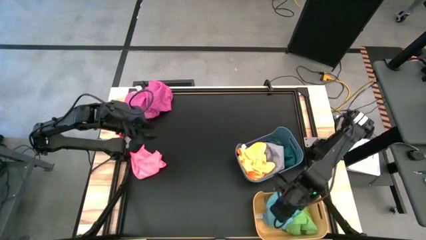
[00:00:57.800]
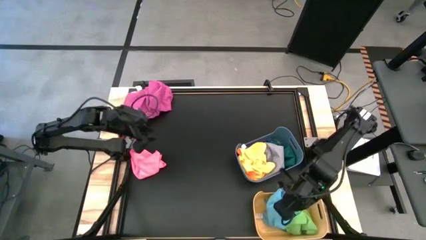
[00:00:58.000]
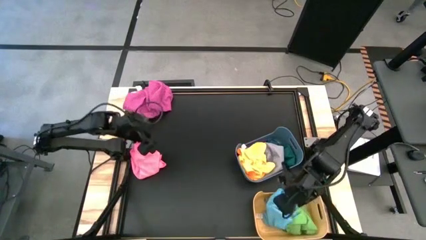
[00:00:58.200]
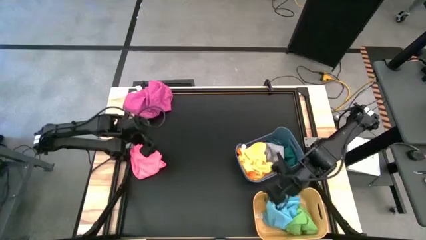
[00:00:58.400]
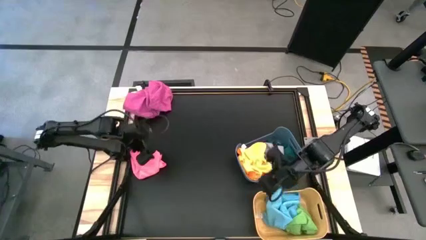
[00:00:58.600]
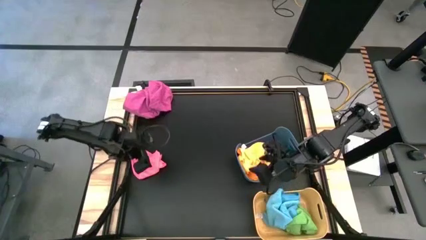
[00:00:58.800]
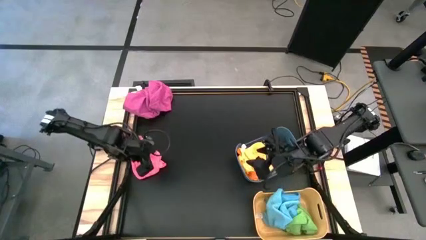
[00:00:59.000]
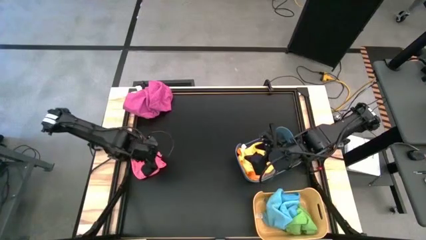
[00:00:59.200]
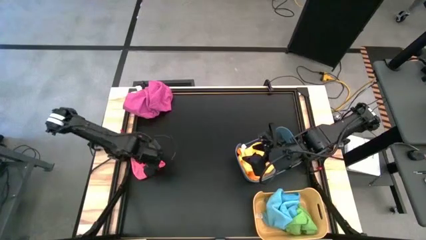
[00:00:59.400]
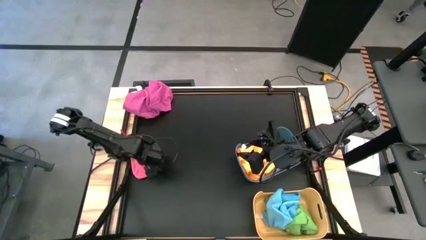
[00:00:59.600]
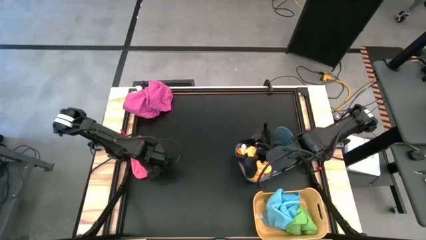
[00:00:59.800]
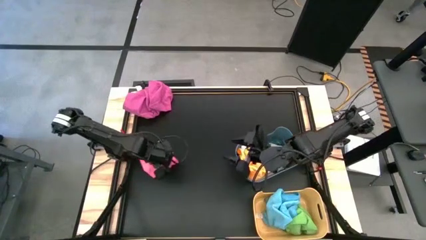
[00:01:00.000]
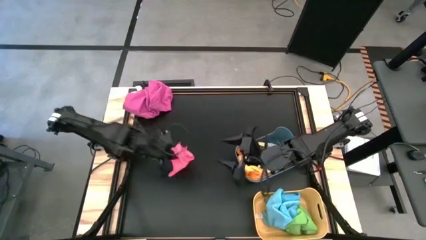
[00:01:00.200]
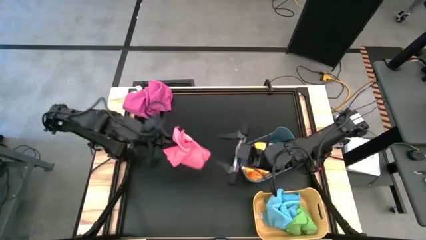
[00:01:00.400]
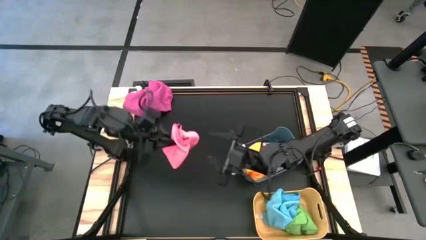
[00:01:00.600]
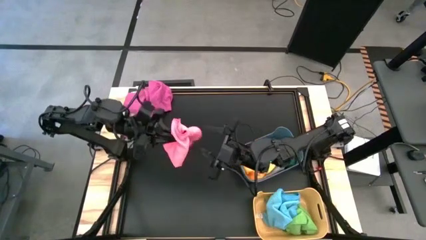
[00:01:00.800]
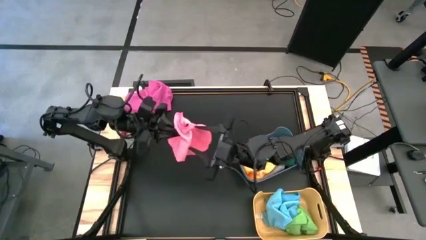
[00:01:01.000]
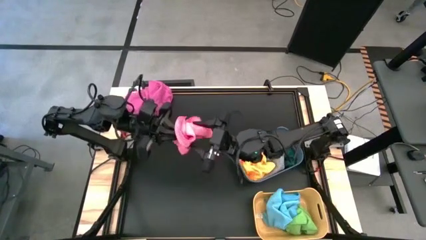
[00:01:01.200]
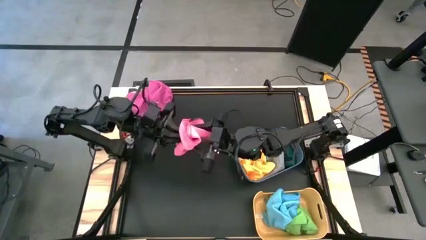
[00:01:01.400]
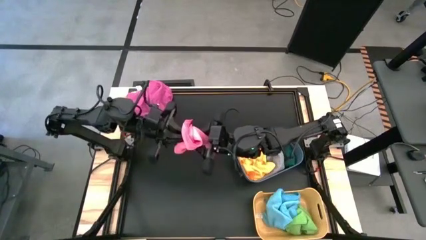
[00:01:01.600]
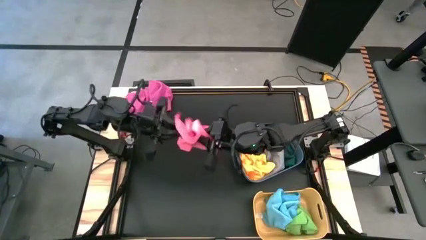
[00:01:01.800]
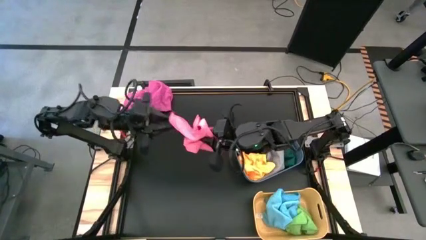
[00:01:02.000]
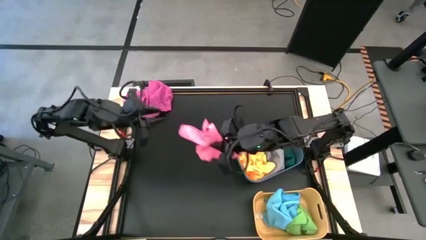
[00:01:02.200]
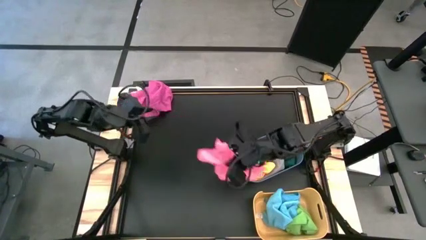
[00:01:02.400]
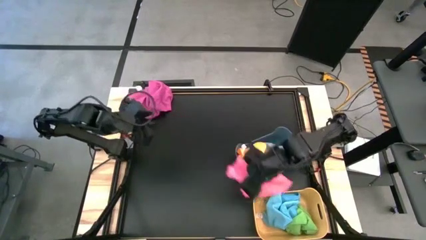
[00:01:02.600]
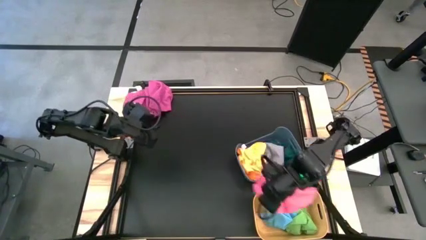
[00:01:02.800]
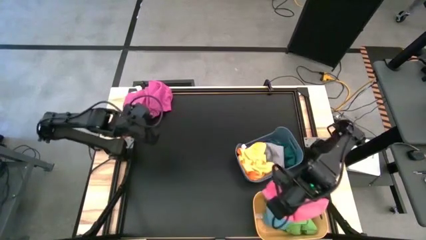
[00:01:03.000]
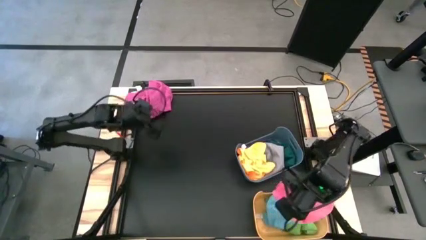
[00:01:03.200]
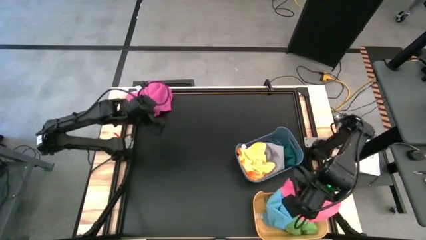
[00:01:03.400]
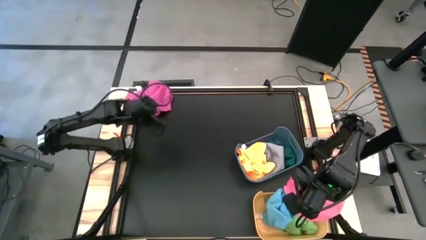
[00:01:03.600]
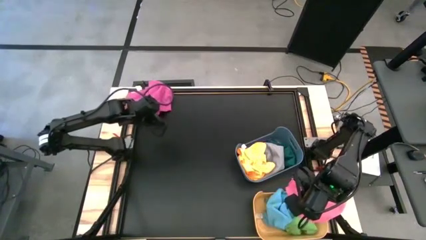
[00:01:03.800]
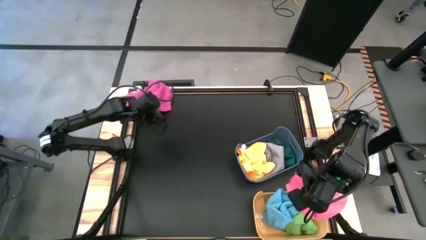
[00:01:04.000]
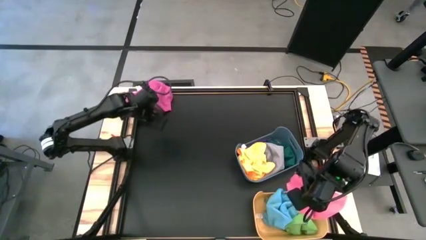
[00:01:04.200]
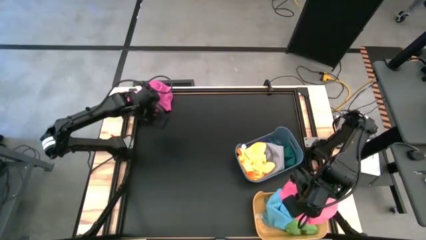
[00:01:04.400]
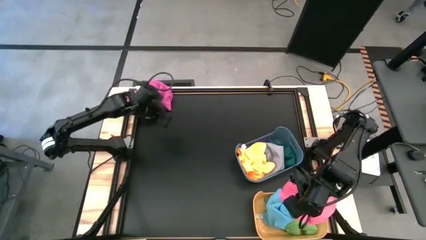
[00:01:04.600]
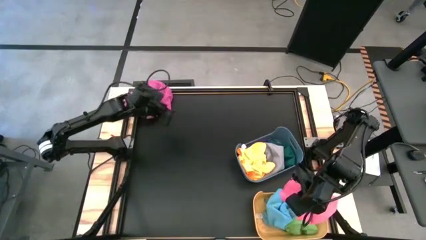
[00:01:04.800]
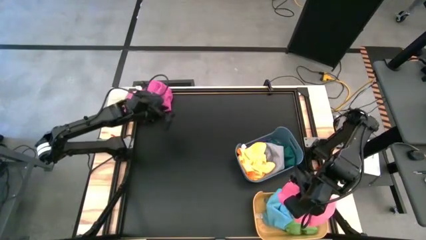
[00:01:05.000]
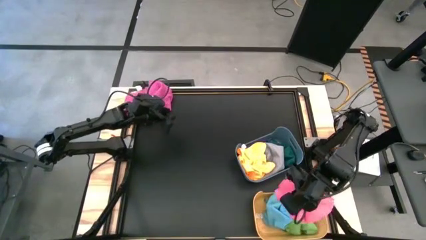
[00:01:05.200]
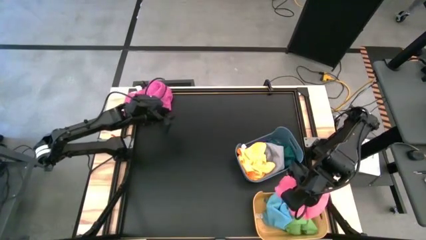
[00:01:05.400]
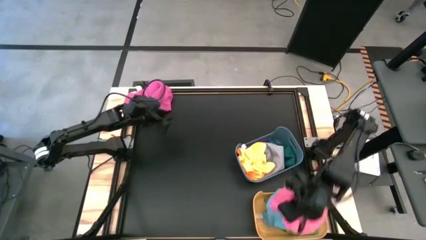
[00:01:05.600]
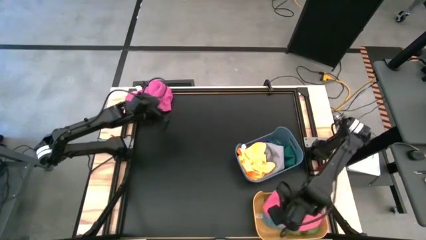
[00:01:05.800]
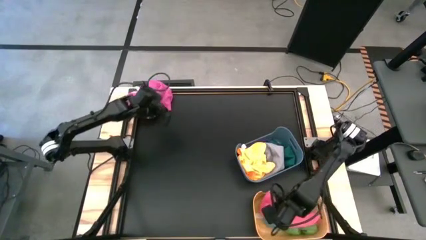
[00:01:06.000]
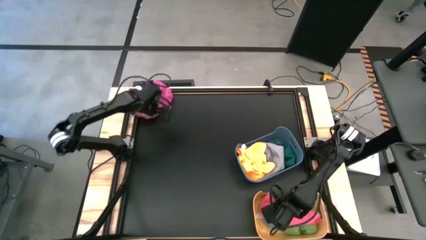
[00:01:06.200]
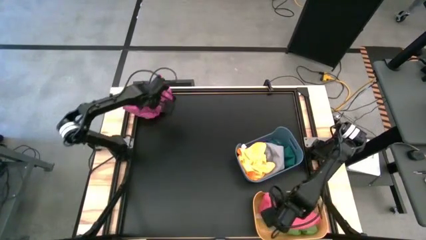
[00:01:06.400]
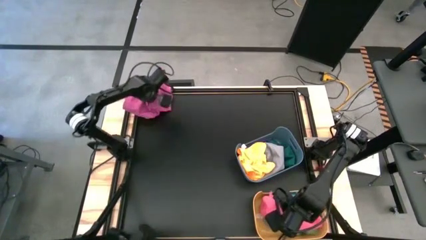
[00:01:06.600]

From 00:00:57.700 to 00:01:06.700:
Task: Sort towels by color in basket
Put the bottom pink towel into the yellow bin

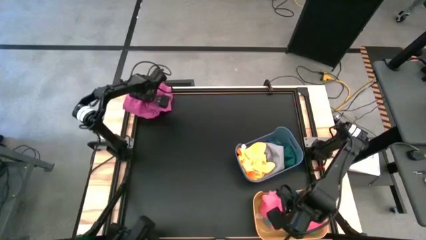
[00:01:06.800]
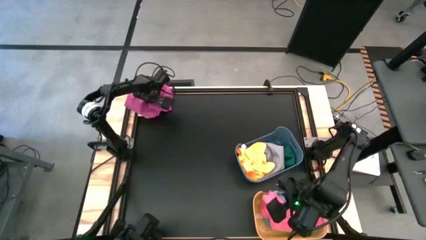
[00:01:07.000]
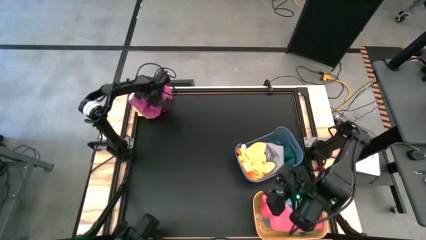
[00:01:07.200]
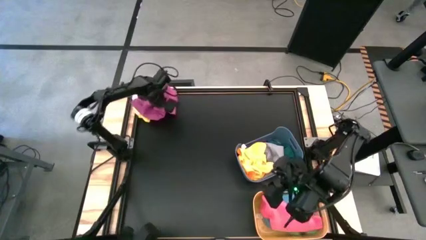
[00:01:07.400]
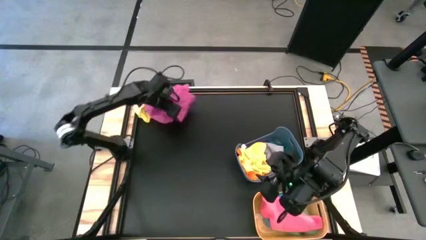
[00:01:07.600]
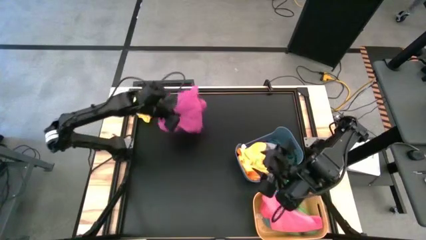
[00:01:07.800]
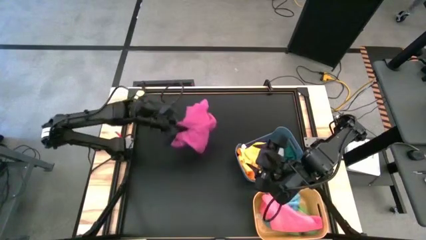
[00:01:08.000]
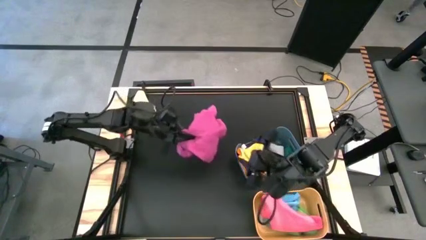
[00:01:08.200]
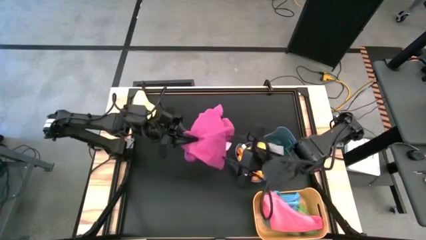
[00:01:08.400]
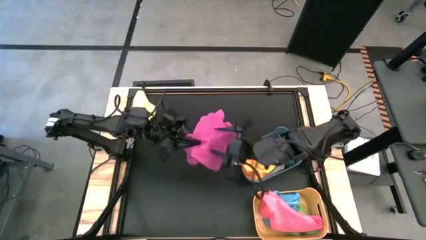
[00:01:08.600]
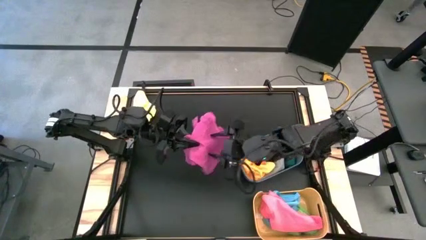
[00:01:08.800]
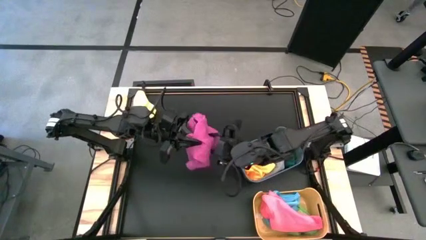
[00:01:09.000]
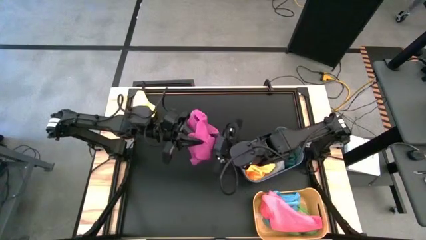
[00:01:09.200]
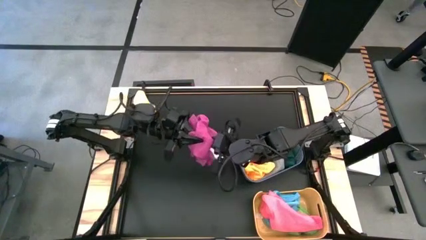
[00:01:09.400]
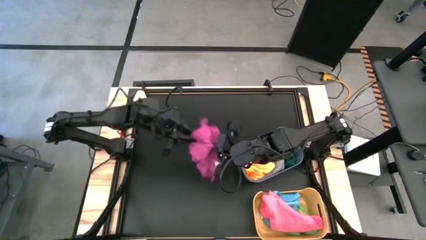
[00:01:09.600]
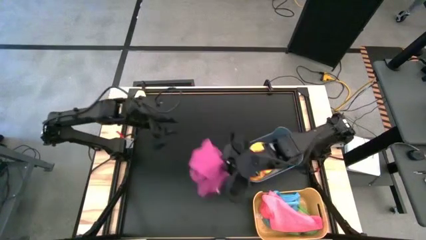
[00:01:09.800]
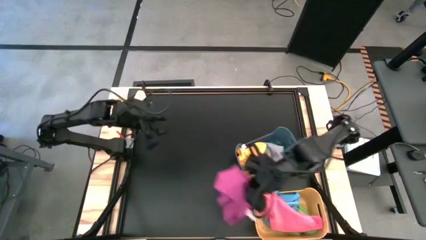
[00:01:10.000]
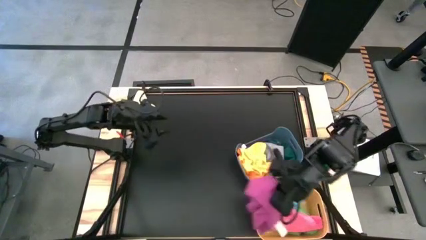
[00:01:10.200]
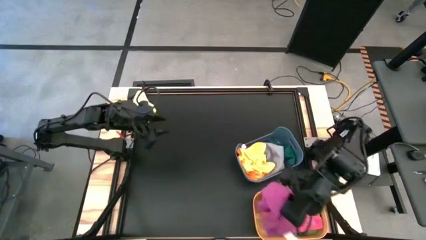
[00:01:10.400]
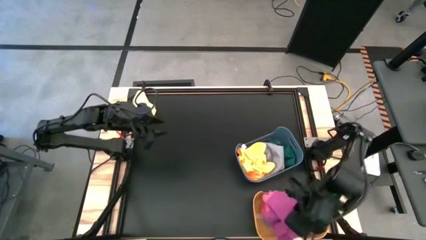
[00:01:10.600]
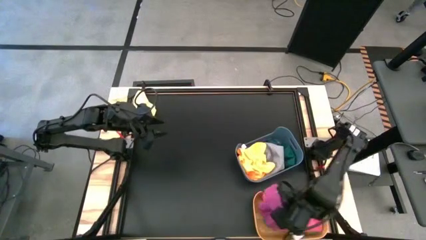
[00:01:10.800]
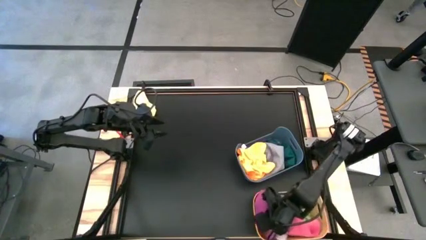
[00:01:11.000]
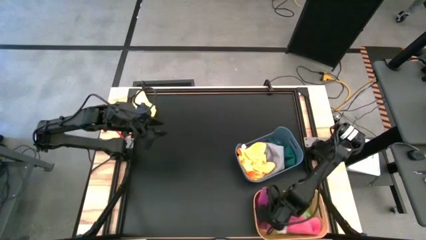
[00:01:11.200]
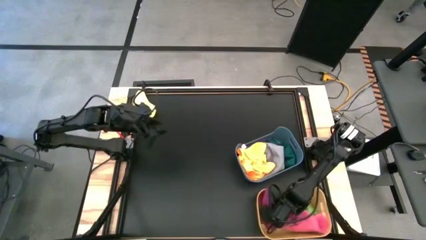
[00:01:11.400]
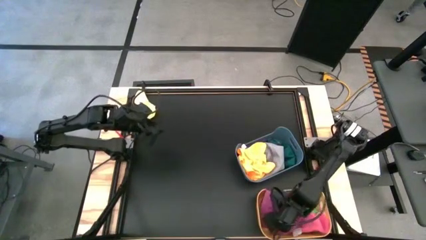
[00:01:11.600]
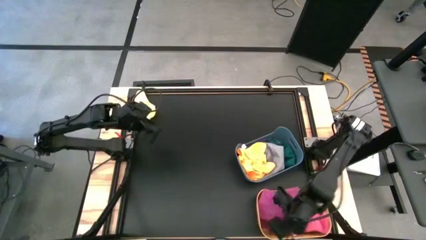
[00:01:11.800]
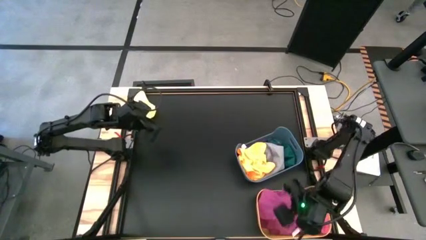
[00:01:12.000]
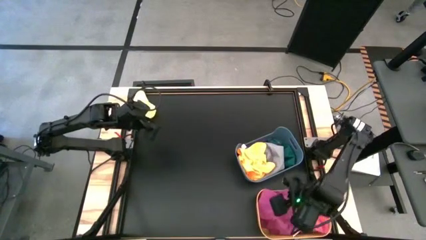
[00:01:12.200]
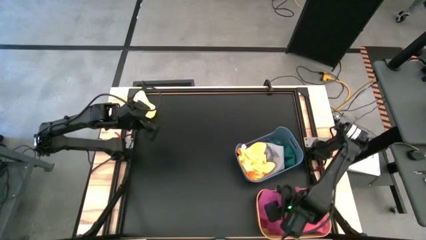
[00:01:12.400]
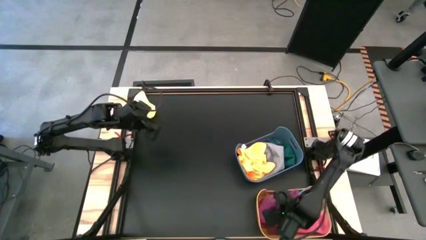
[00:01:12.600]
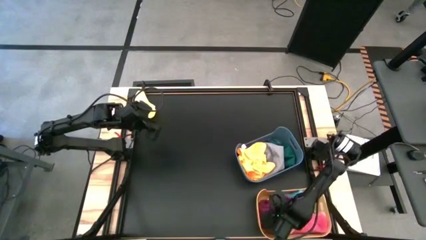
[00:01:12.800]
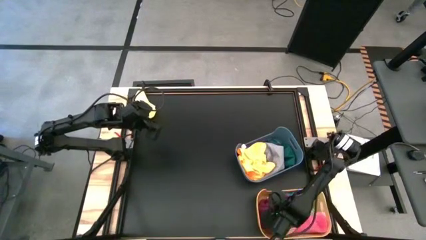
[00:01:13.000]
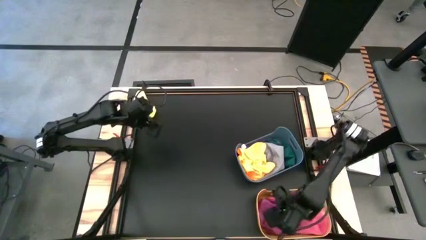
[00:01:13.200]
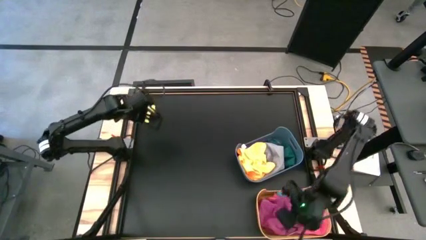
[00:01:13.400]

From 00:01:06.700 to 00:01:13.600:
Put the pink towel into the yellow bin
